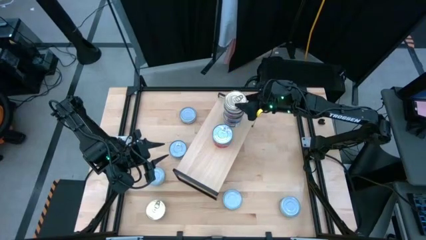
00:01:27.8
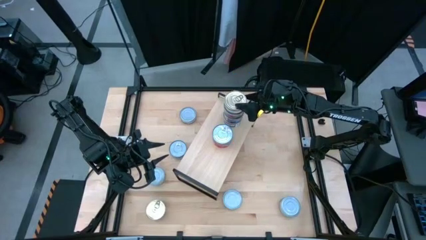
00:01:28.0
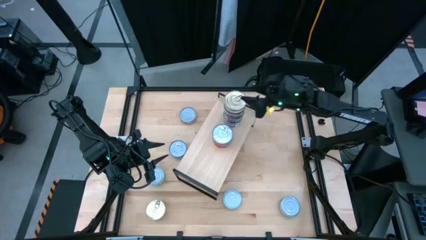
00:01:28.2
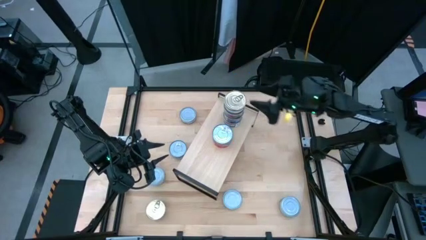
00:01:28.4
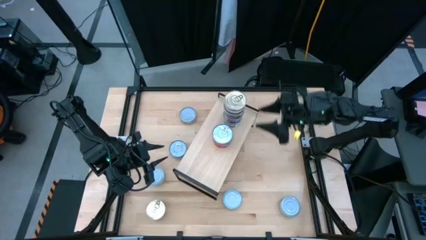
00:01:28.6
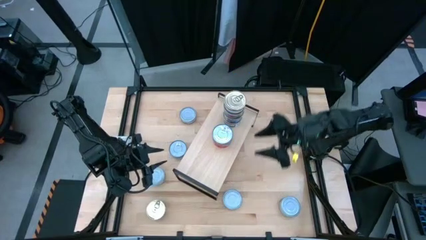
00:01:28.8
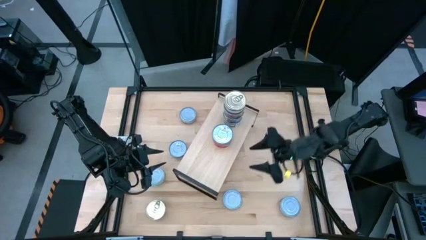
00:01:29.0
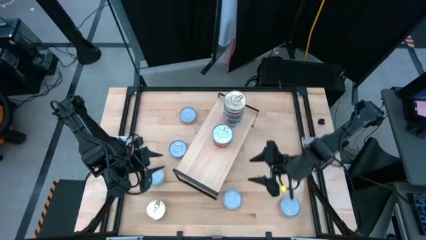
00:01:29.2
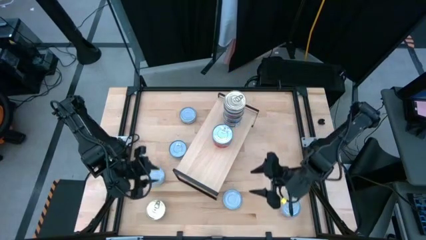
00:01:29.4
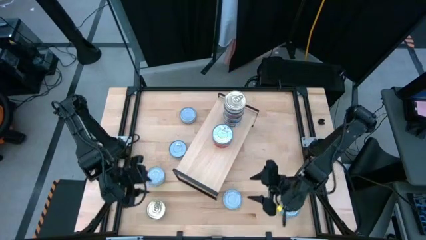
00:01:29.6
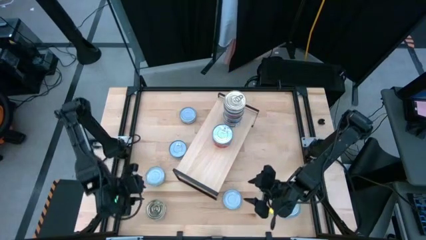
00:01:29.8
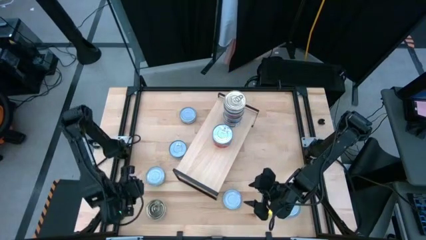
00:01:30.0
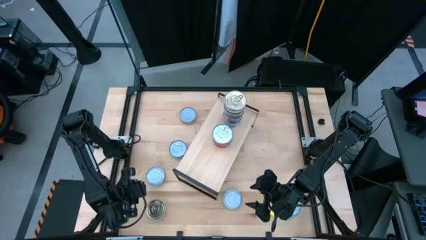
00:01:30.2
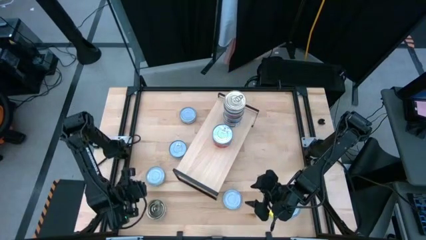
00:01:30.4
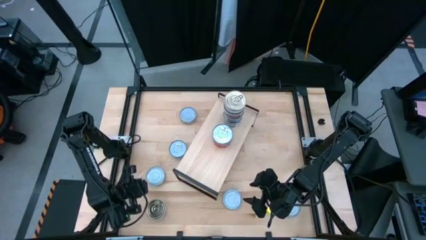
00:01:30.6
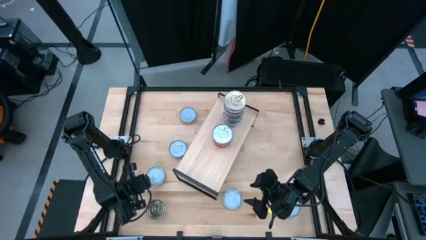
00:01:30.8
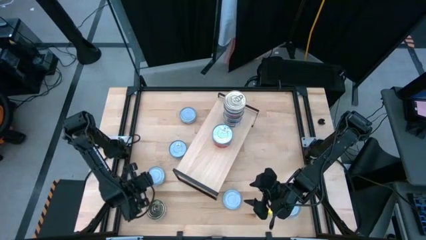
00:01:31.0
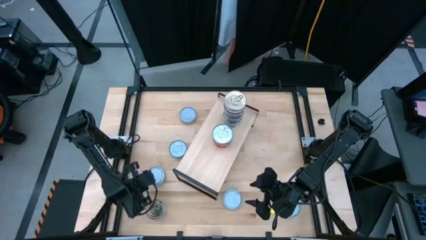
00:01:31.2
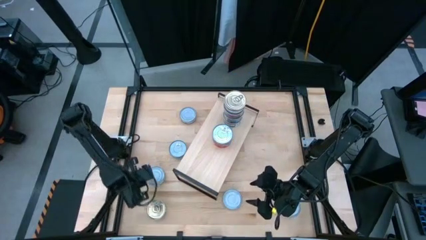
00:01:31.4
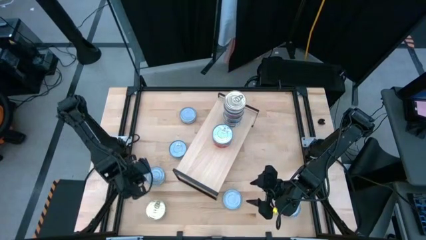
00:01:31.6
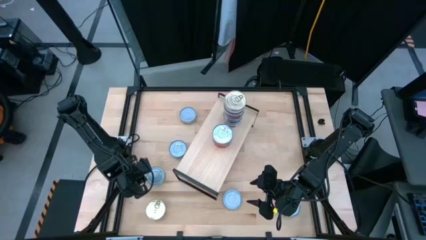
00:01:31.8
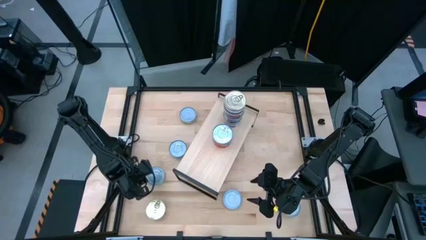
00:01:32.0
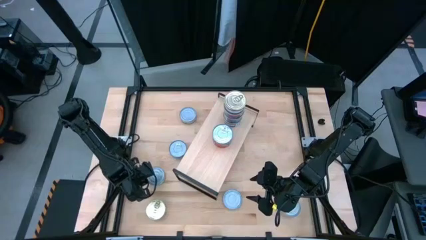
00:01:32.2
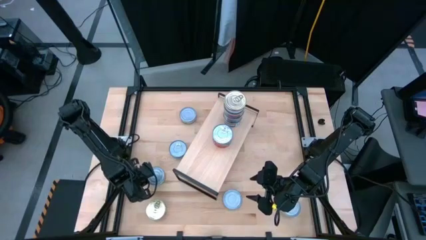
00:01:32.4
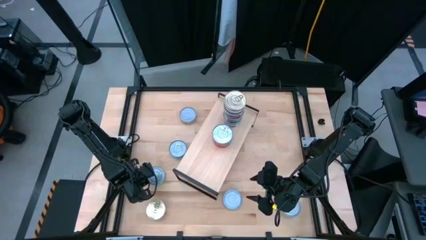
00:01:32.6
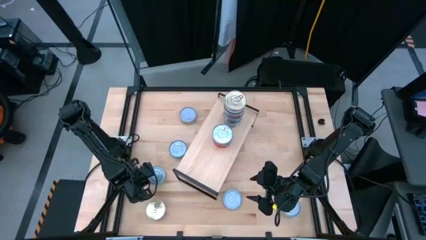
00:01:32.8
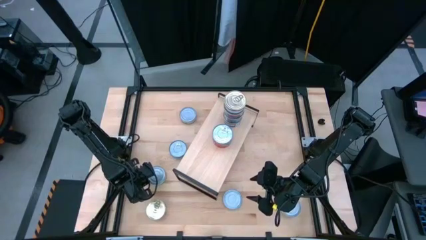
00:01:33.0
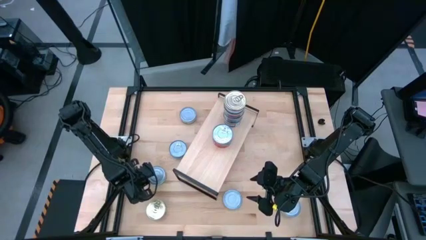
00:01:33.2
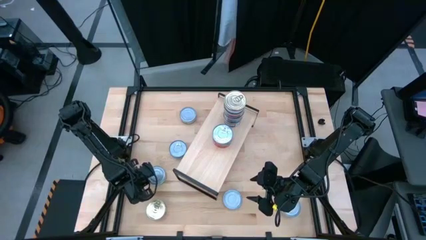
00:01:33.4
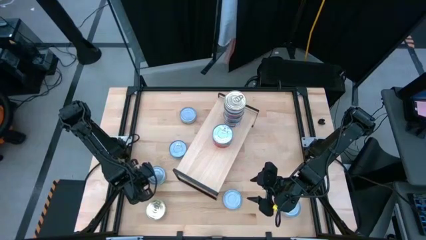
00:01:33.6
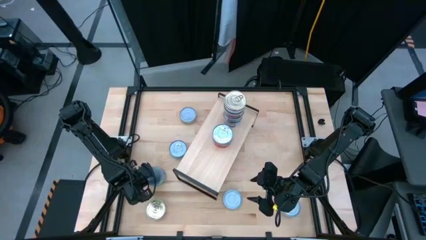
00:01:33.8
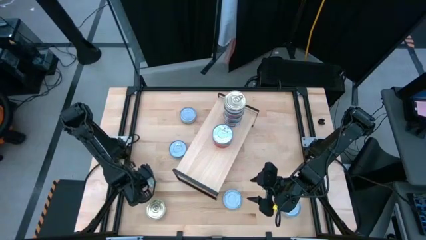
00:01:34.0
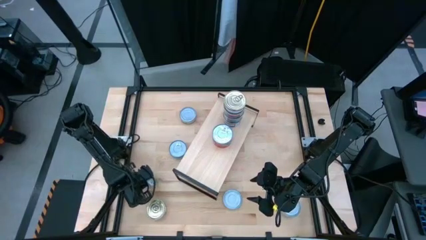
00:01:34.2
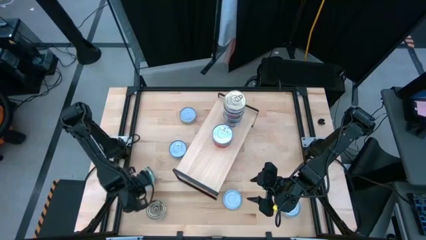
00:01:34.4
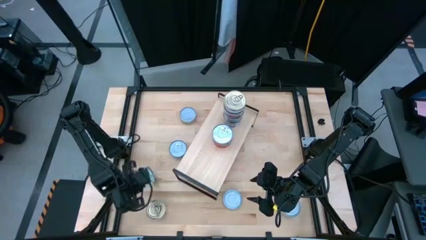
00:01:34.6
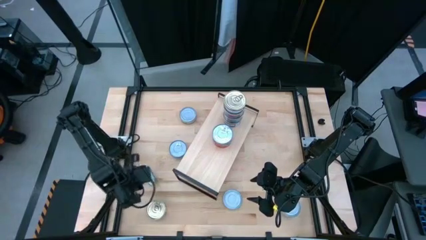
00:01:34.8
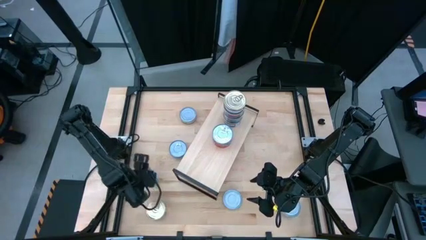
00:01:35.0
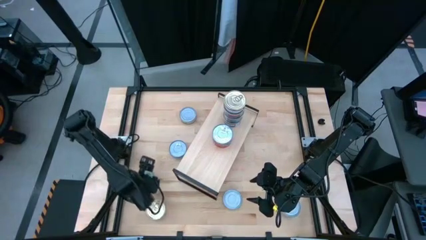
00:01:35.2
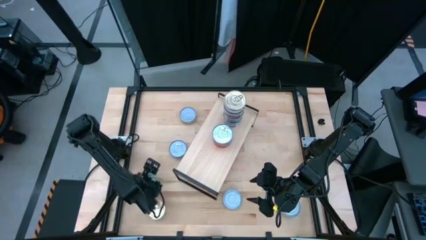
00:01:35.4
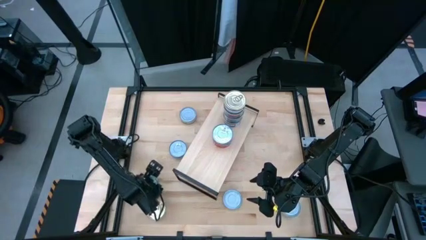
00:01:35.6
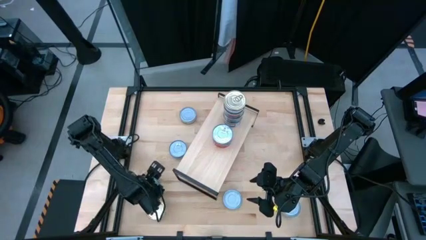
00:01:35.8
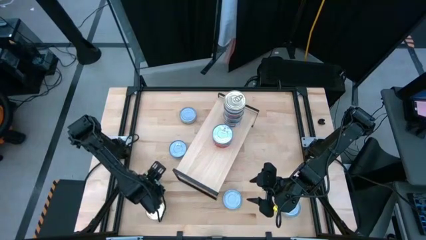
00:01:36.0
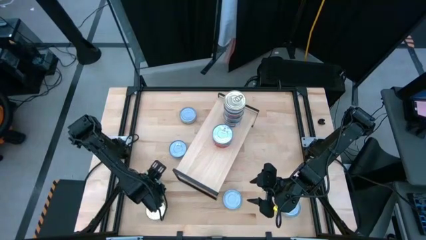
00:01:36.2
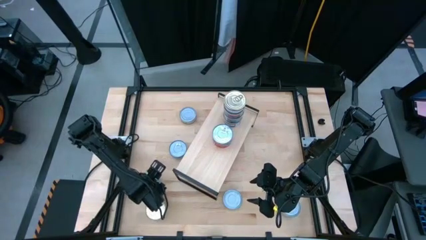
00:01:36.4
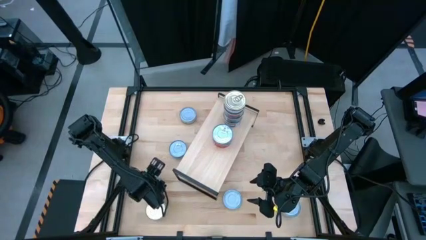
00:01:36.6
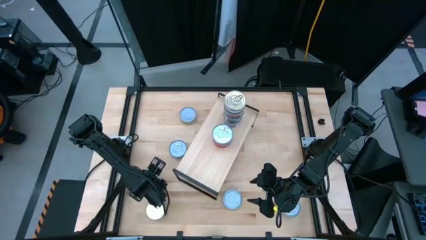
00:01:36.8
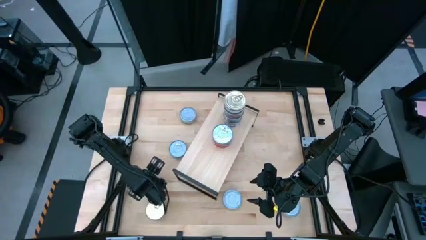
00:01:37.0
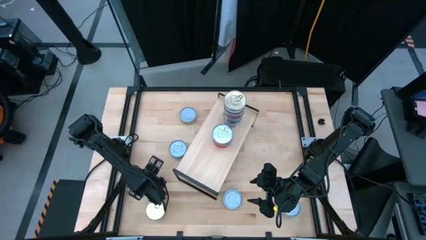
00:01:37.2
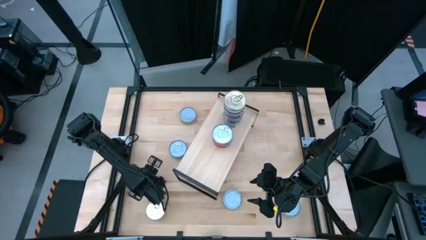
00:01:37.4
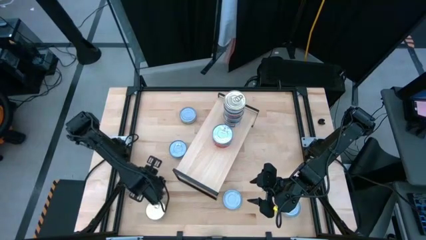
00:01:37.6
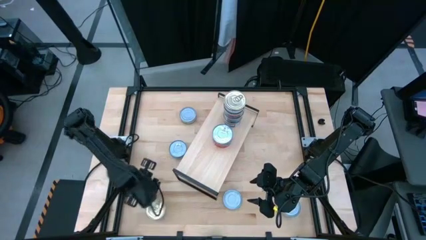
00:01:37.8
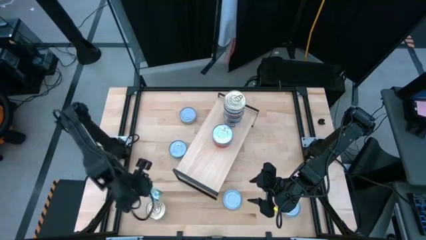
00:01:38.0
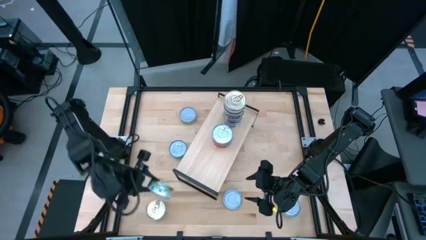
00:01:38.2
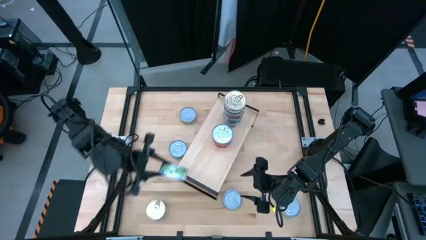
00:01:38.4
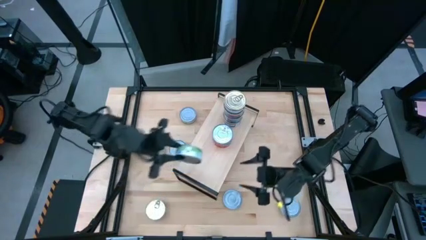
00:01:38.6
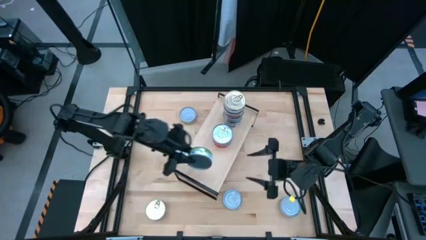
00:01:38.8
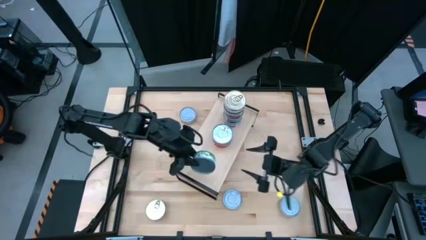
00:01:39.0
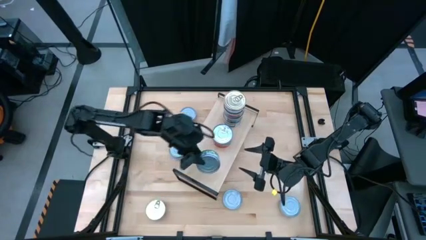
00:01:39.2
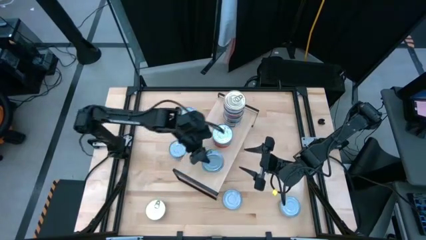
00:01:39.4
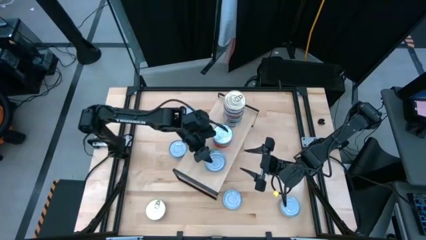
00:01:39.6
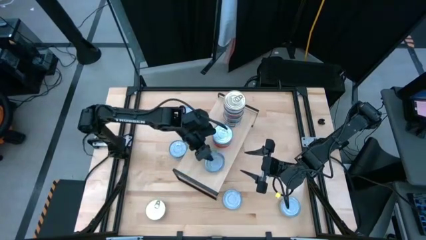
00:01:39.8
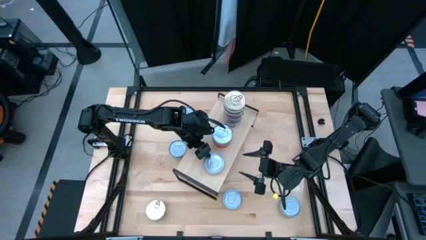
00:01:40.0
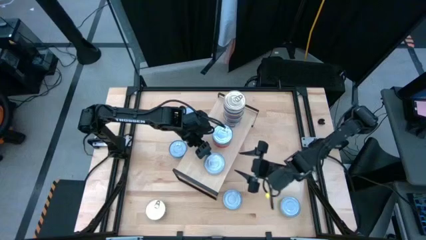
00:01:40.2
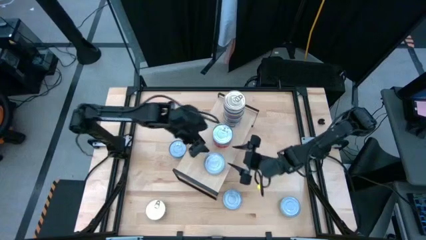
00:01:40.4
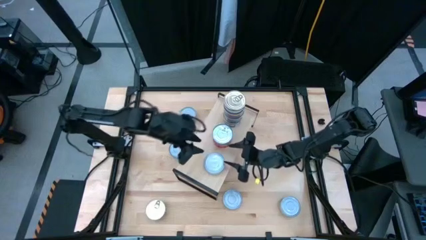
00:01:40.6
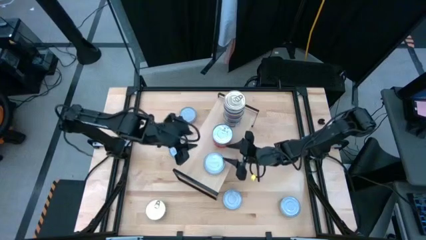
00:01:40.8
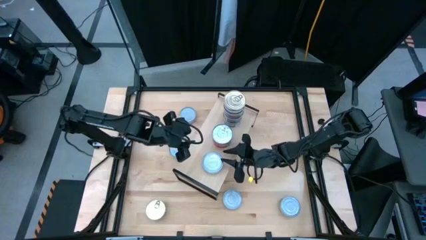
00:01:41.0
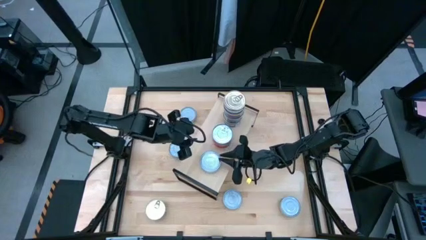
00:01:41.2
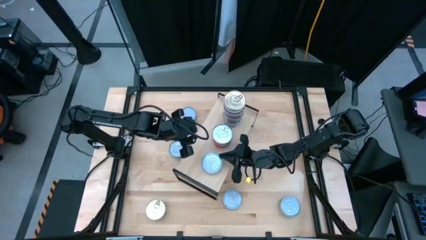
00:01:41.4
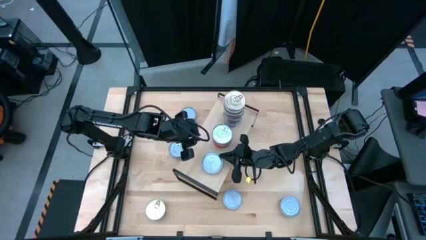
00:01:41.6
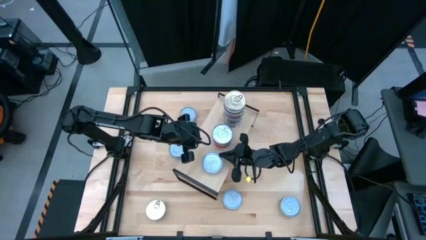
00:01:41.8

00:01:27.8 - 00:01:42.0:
Task: Stack canned seafood by type on shelf
Put the green tuna can on the shelf

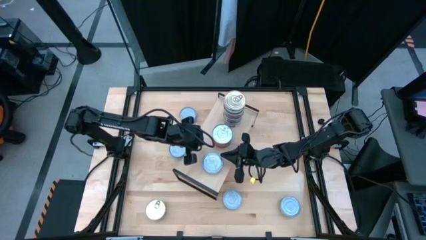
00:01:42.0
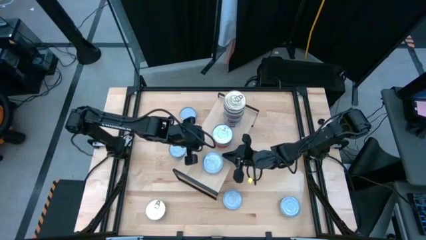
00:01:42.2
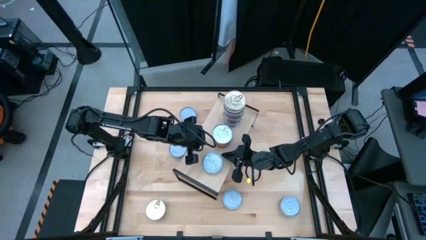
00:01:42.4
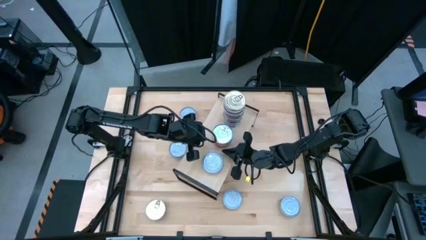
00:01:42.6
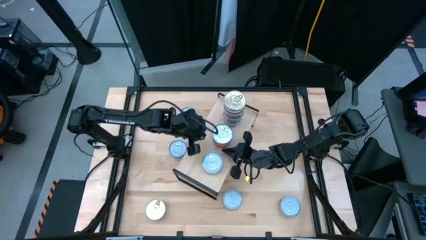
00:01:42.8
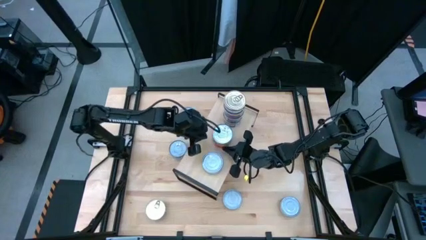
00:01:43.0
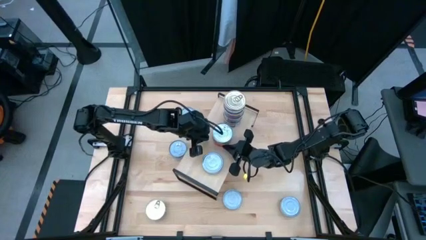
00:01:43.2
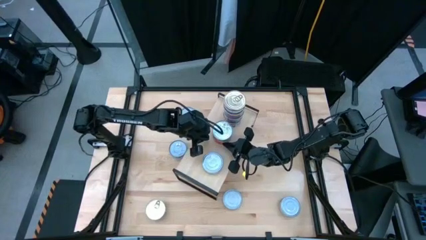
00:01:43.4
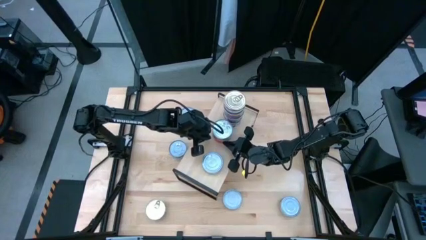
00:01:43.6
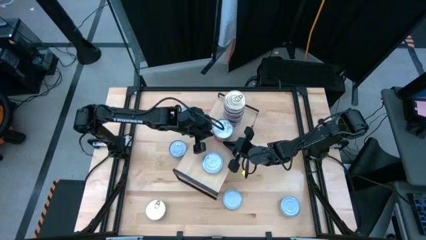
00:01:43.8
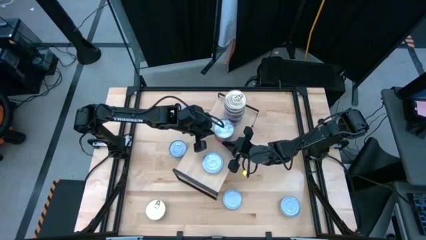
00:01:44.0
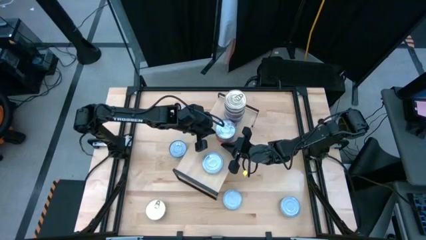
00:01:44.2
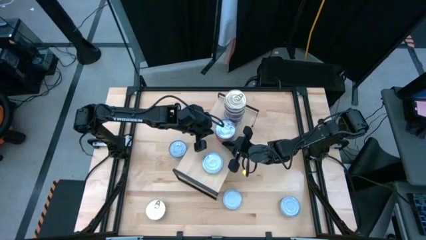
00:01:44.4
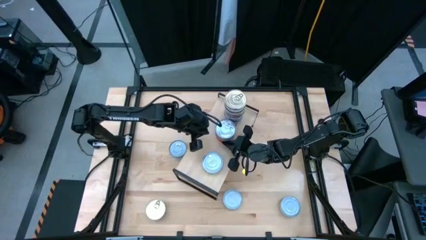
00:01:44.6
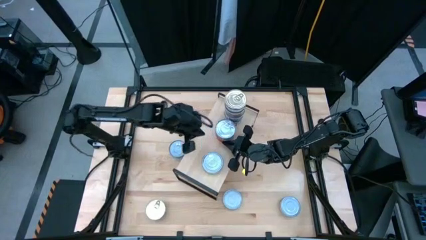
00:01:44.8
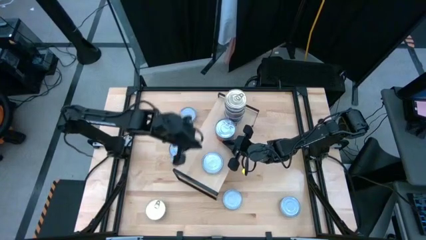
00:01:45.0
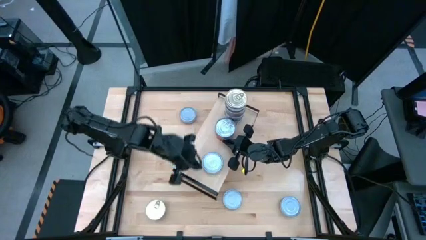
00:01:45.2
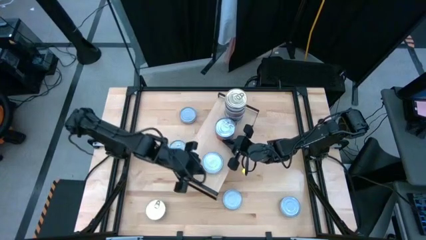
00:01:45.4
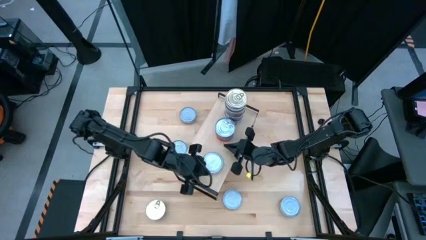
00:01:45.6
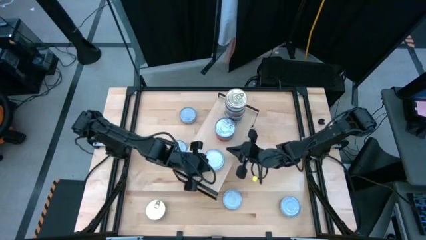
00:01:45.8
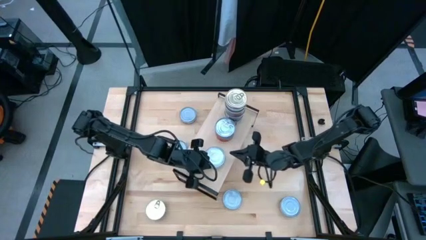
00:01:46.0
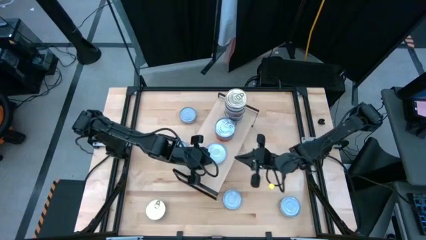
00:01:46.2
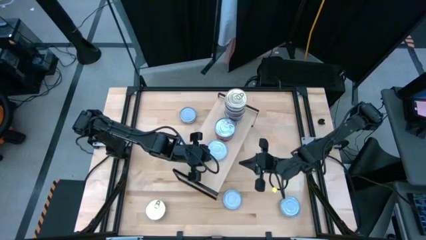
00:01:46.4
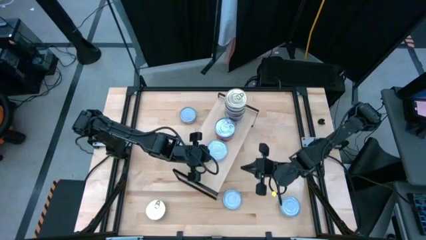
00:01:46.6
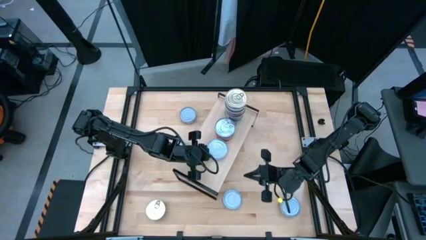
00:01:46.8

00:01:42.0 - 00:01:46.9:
Adjust the tuna cans on the shelf
